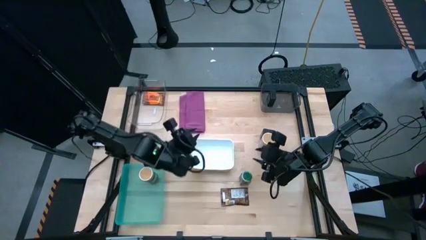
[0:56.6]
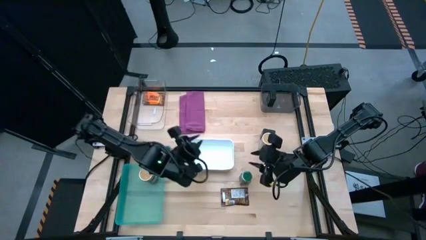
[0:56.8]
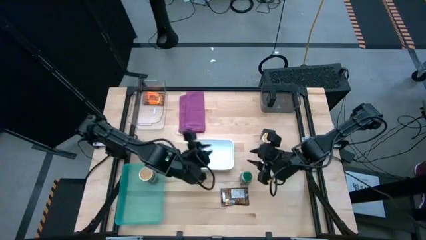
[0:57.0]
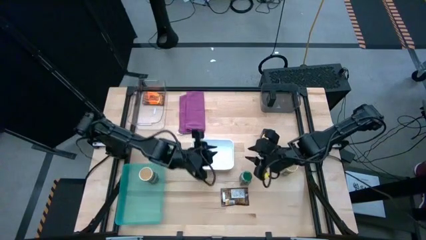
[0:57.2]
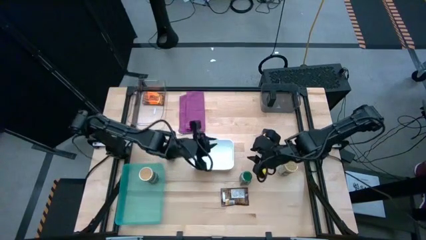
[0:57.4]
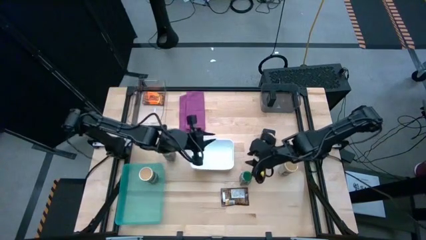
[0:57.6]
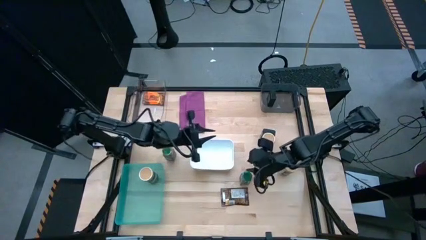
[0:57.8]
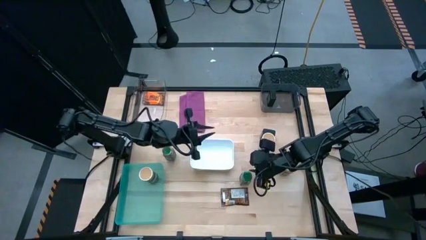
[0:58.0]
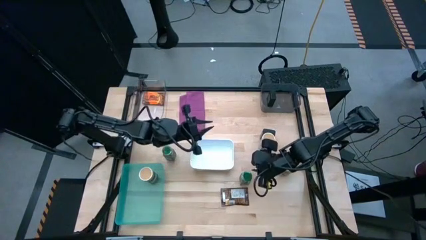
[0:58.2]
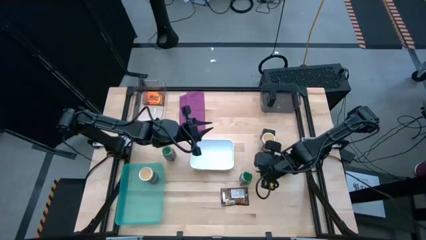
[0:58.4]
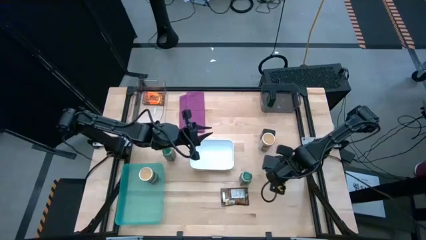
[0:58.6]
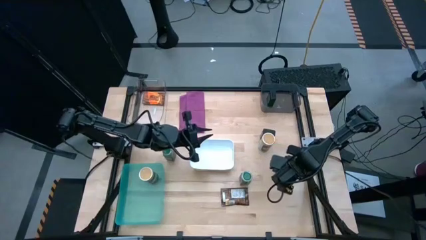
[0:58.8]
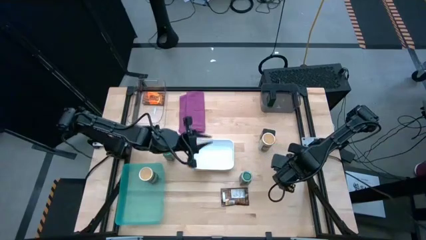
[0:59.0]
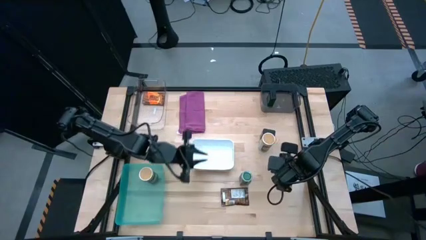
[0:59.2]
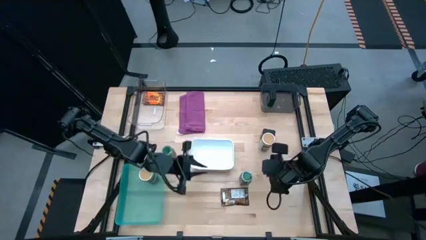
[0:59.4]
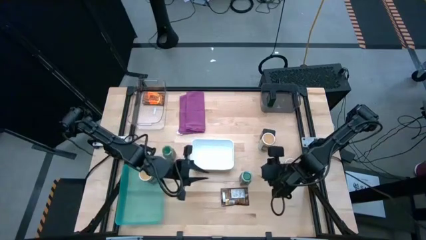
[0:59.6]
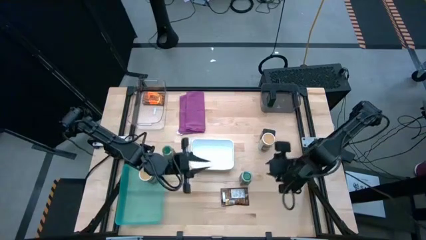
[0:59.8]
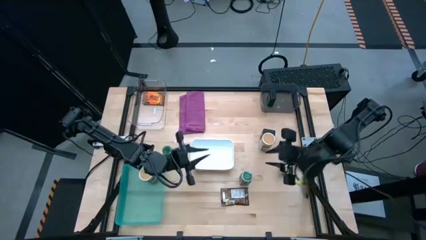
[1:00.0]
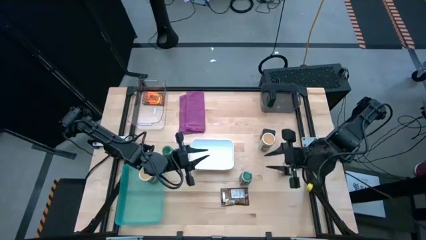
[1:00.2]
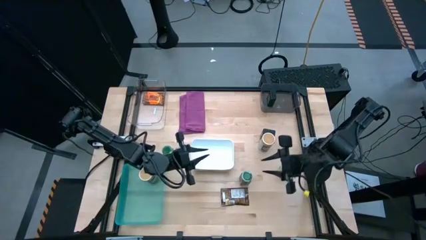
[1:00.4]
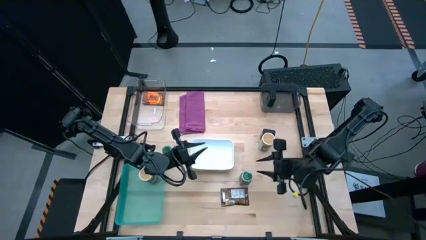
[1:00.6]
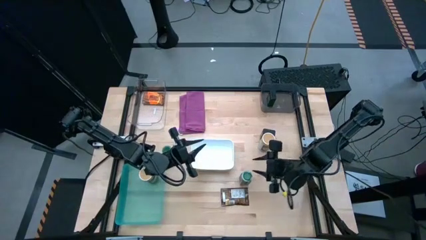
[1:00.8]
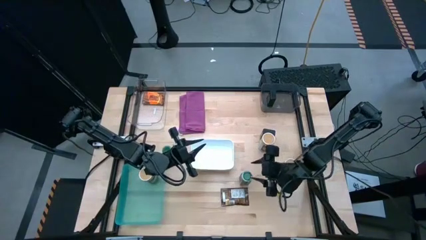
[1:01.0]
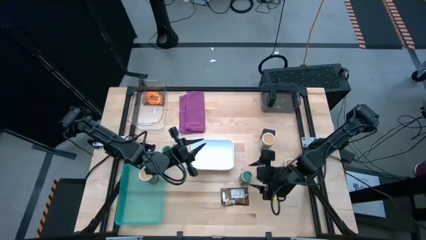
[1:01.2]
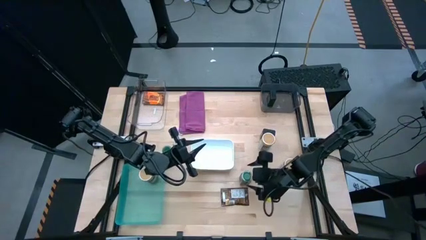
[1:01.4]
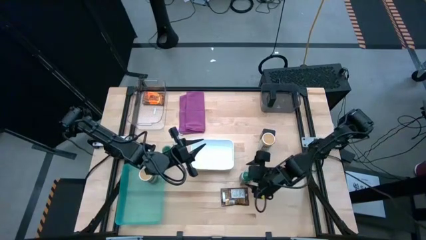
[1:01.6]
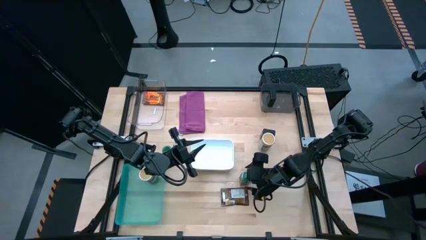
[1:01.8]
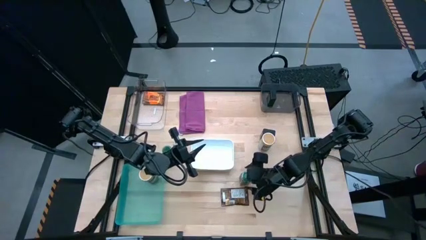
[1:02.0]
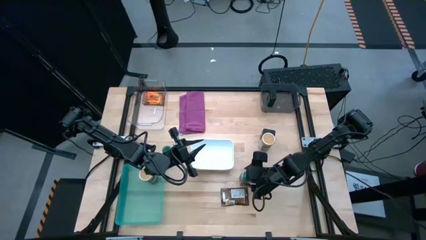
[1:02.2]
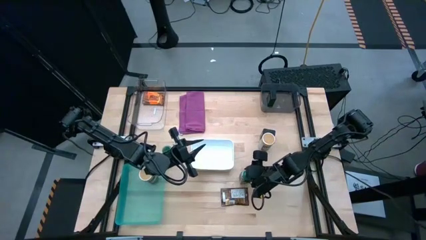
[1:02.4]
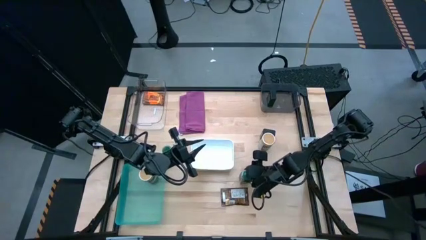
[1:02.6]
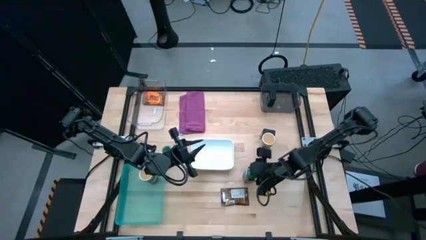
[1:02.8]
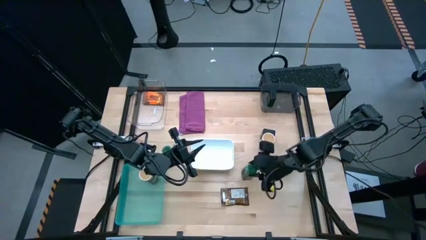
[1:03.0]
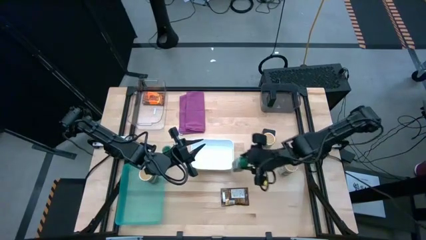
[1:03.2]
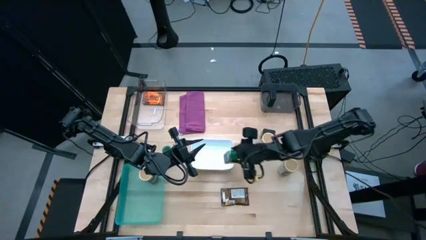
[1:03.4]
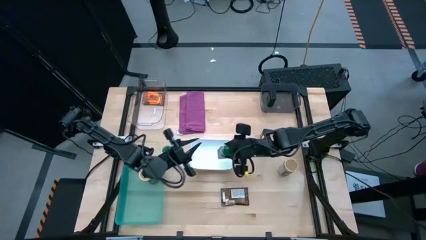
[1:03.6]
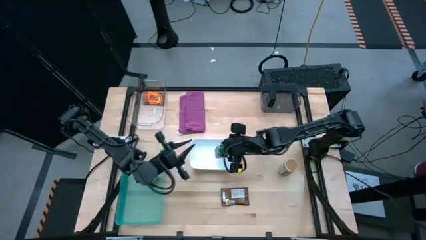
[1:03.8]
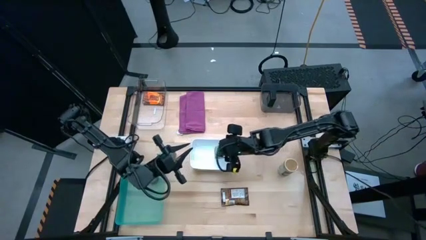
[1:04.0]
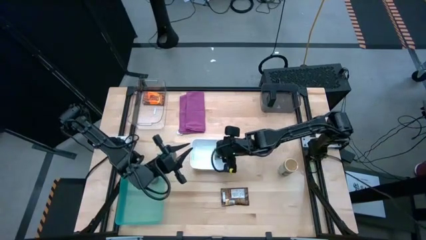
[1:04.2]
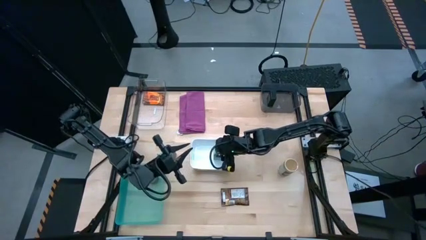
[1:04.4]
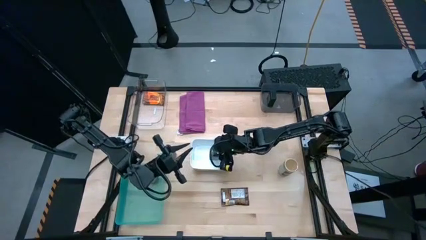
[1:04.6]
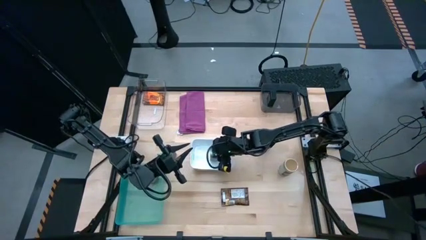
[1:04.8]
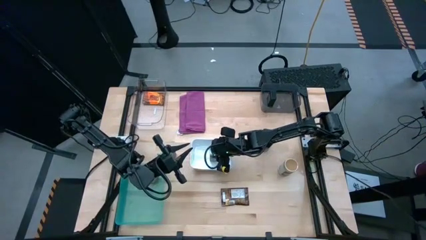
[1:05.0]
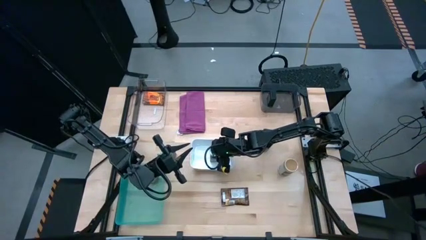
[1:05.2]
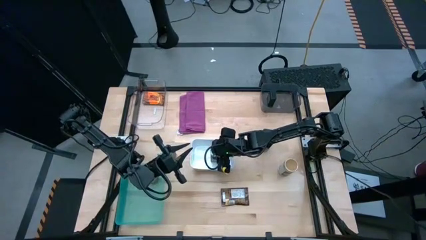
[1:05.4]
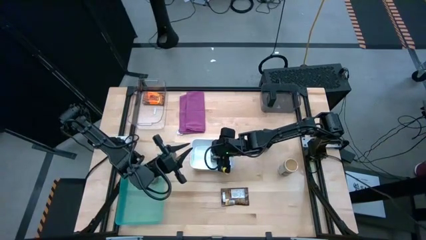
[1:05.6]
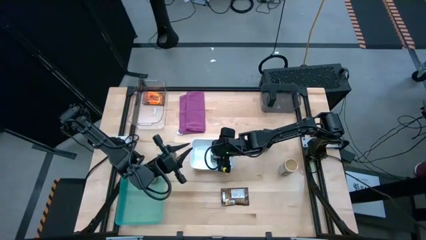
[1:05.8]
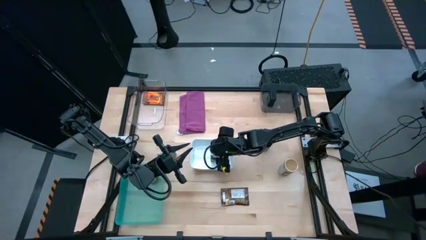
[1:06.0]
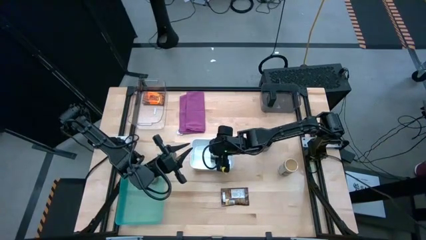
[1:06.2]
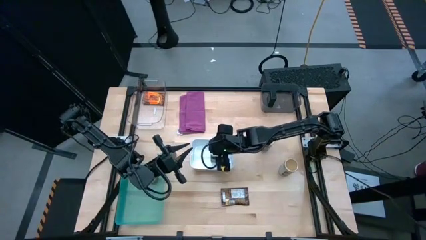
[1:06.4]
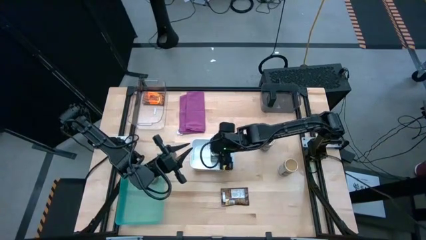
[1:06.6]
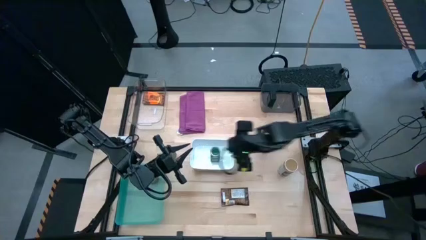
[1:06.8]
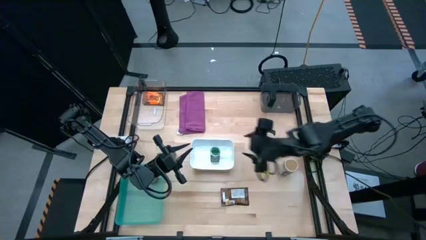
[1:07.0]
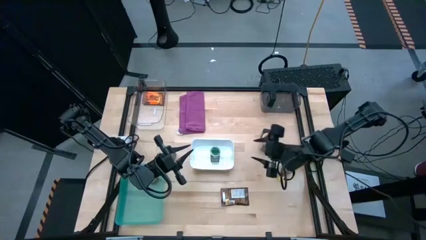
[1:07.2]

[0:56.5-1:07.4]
Task: Sort spices by type
Put the right green seasoning bottle into the white bin

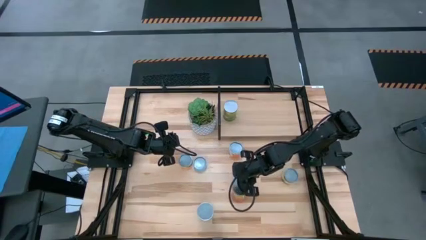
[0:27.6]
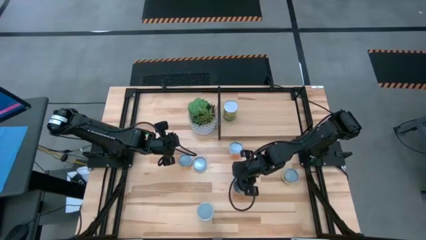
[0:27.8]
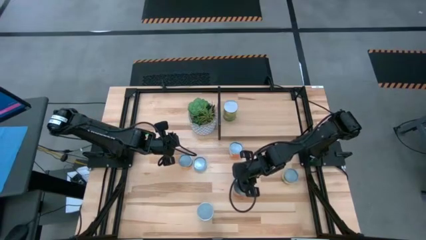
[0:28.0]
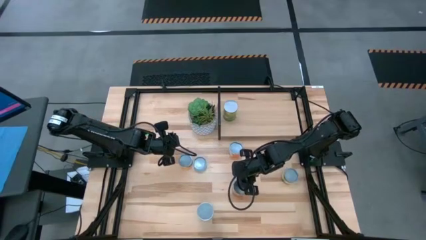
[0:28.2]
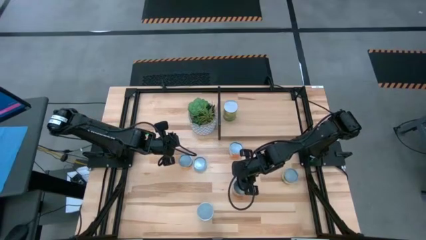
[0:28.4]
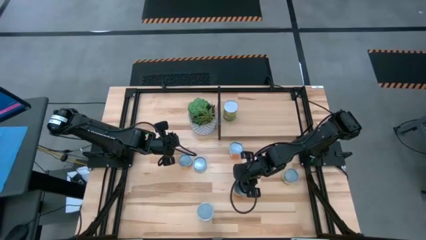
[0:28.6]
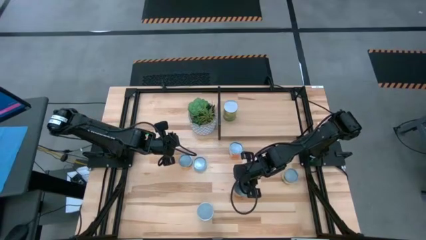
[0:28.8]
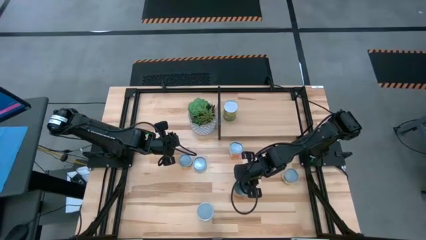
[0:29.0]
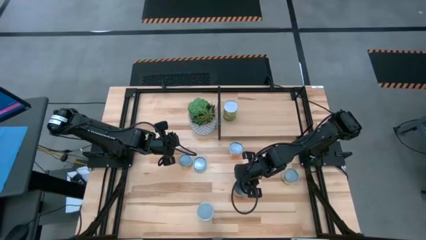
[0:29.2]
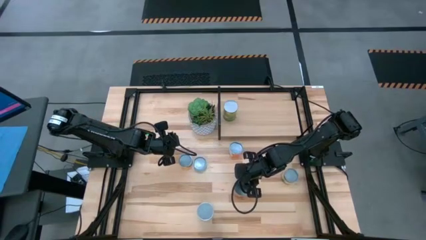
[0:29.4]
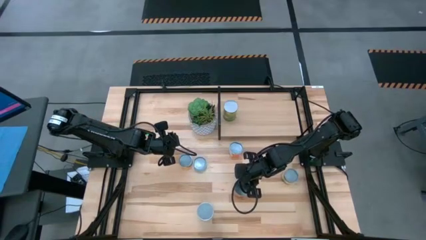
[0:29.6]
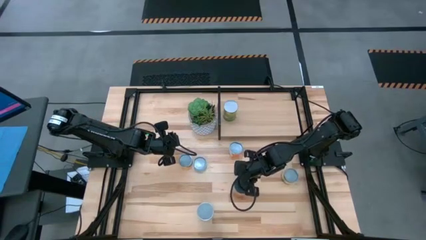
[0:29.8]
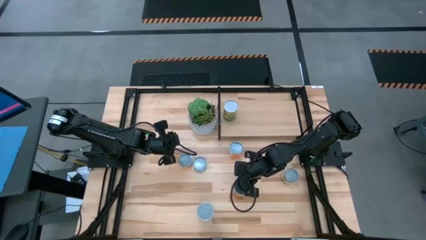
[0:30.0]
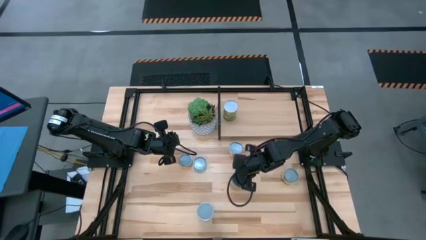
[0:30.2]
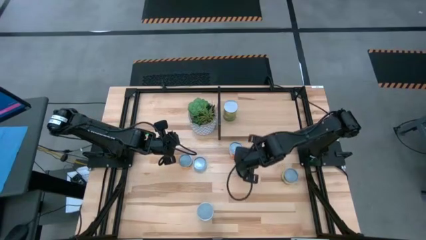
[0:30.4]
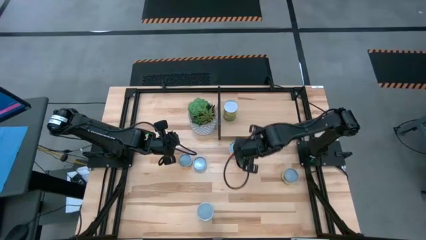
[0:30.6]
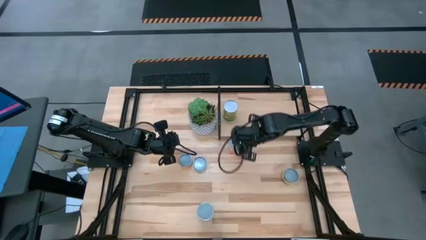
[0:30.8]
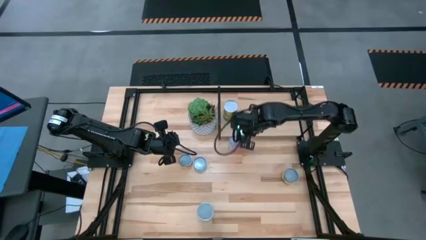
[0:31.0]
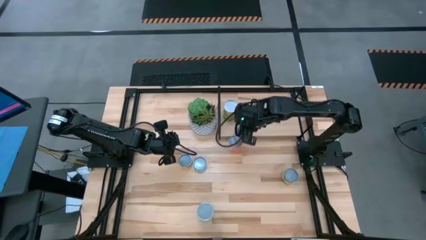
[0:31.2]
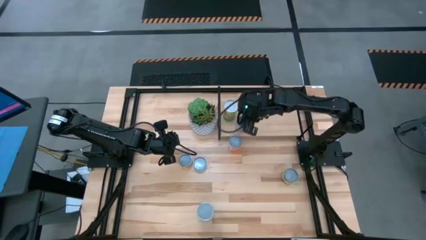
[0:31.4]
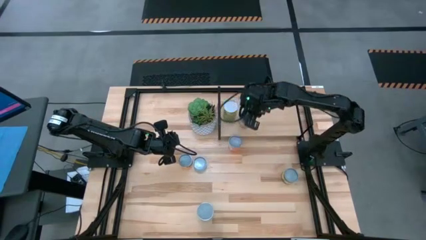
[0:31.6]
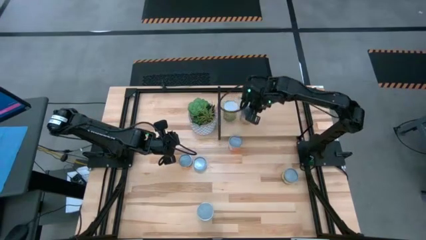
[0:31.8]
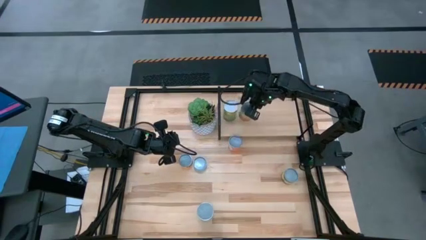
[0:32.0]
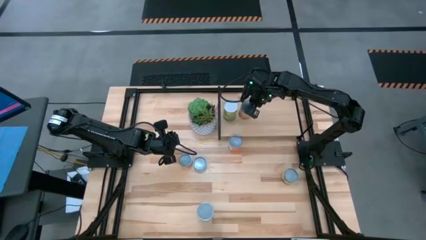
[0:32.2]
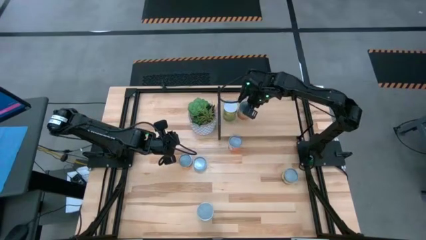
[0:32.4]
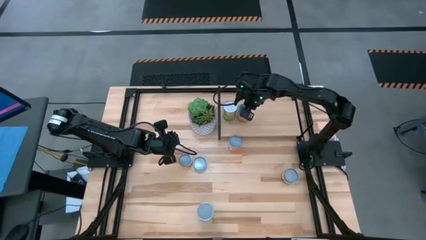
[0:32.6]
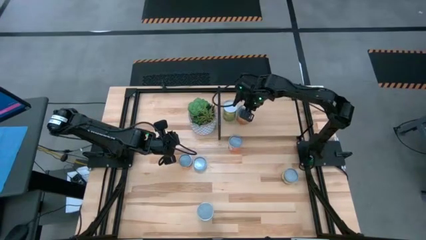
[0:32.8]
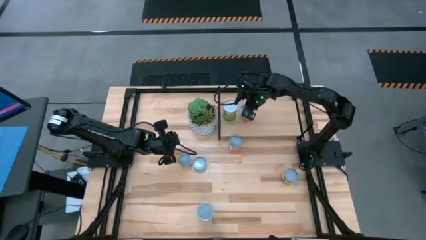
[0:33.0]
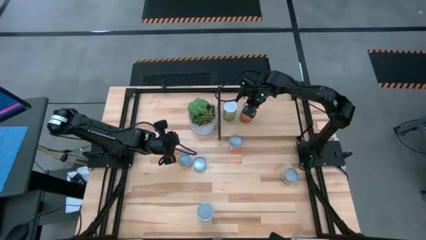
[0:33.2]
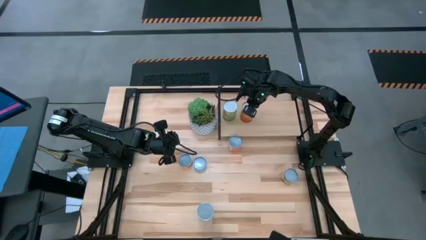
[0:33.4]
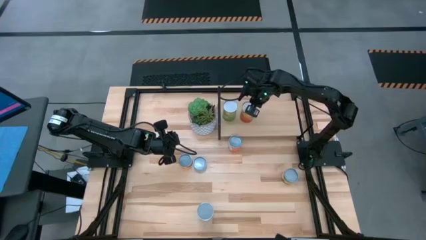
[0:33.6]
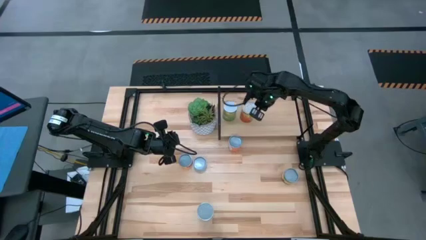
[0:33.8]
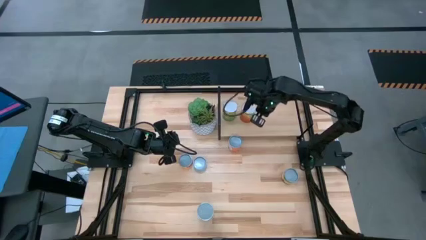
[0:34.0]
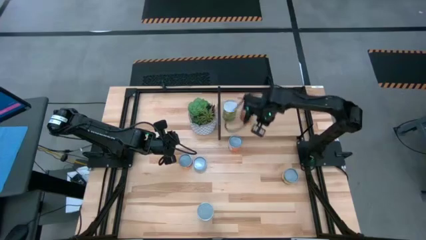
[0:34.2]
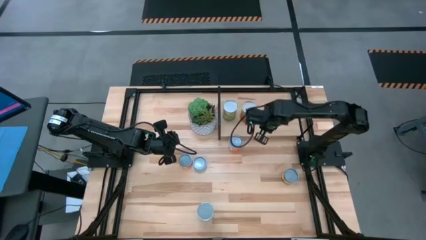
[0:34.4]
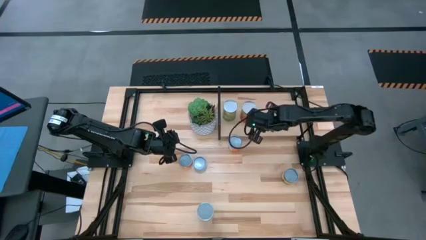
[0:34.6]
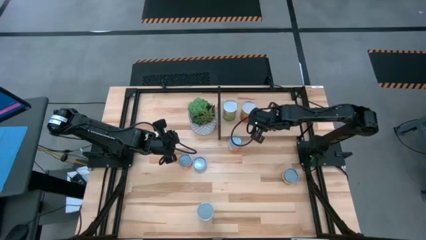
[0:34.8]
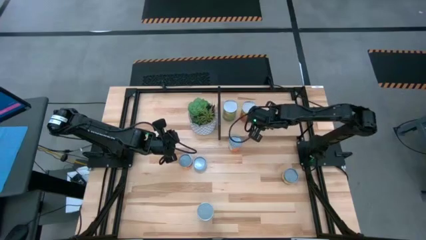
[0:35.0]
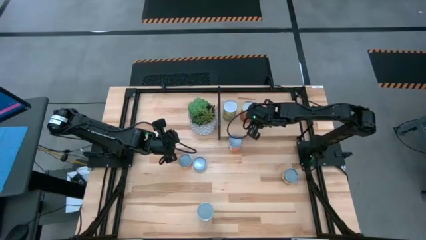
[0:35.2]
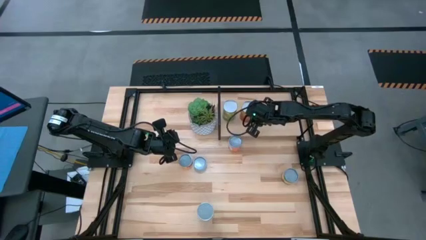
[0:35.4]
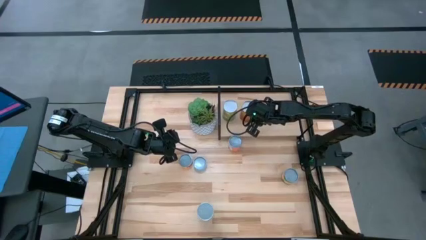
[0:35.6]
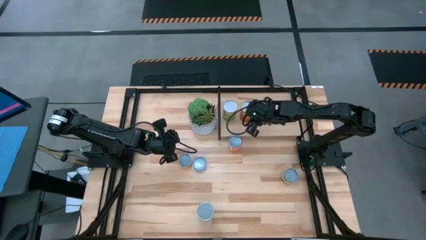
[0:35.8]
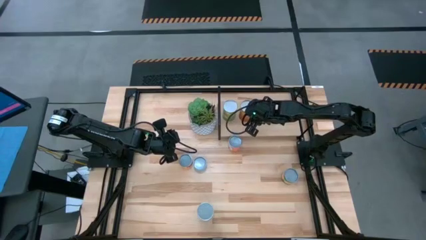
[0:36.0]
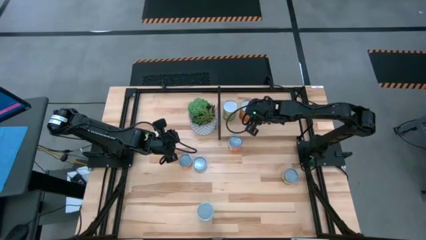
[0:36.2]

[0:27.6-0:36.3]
Task: Pick and place cans onto a shelf
Put the canned green peas on the shelf
